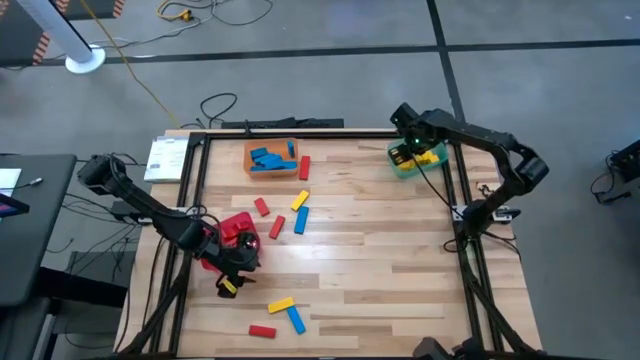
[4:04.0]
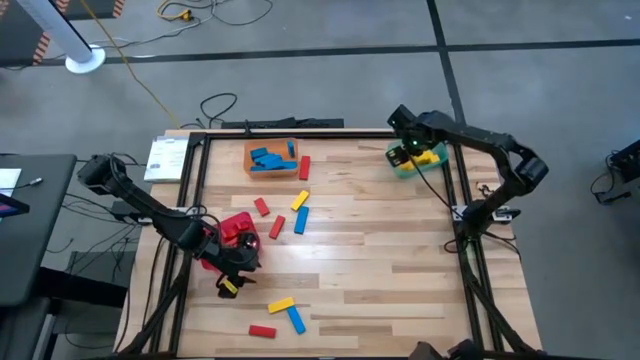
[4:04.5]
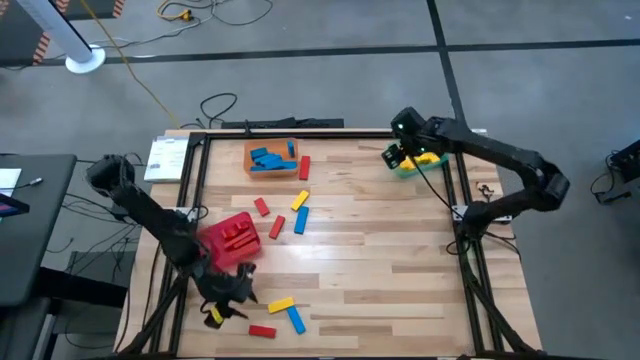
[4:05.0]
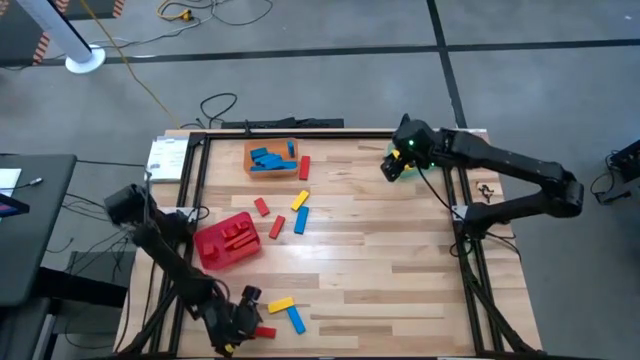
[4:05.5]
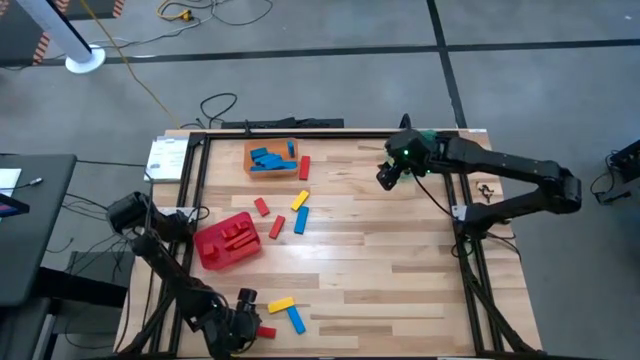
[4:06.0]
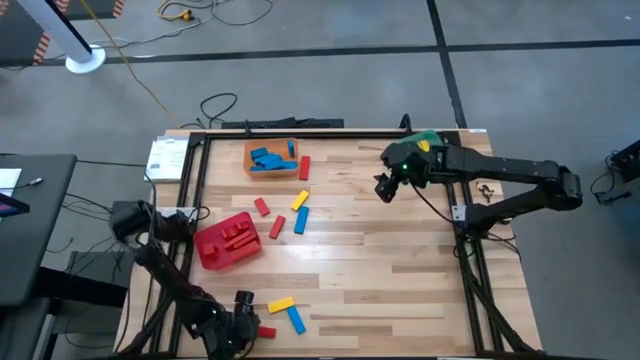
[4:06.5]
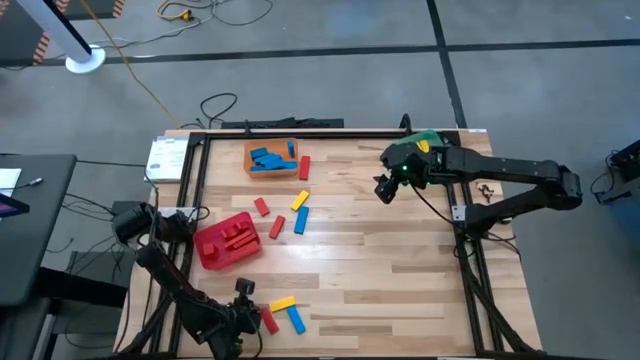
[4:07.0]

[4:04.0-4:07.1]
Task: Sort blocks
Put the red block into the red bin

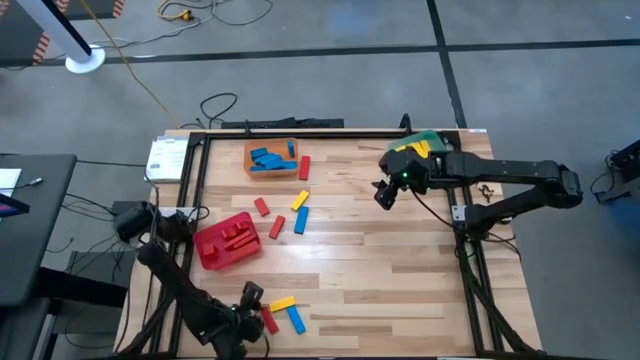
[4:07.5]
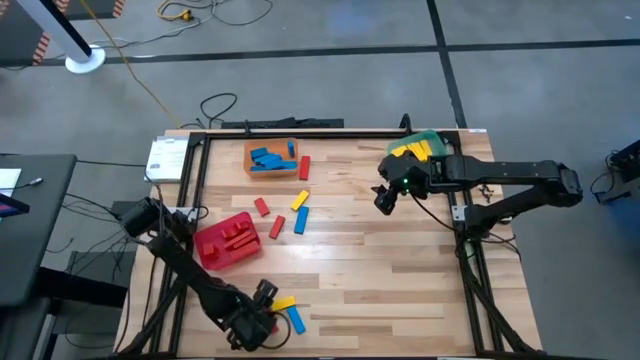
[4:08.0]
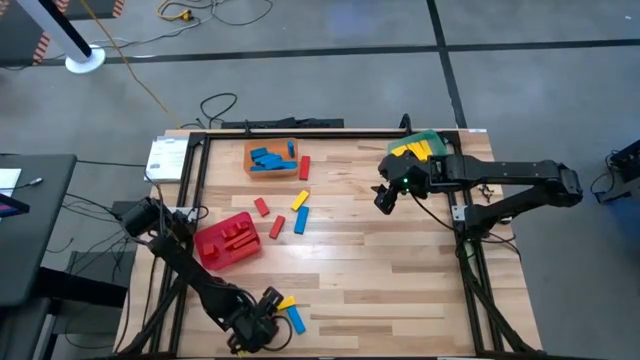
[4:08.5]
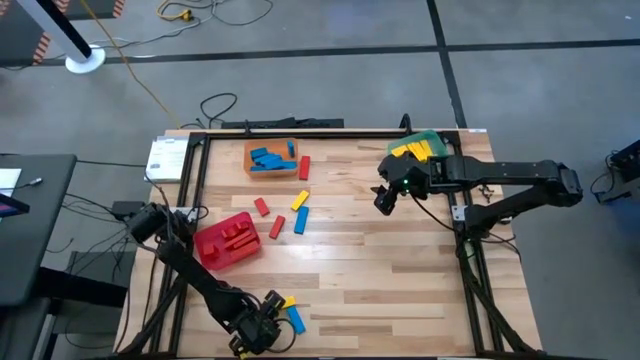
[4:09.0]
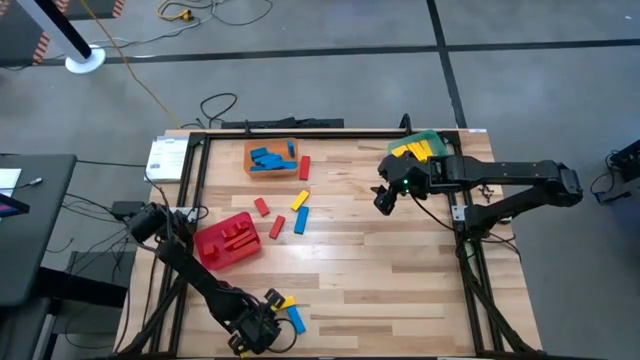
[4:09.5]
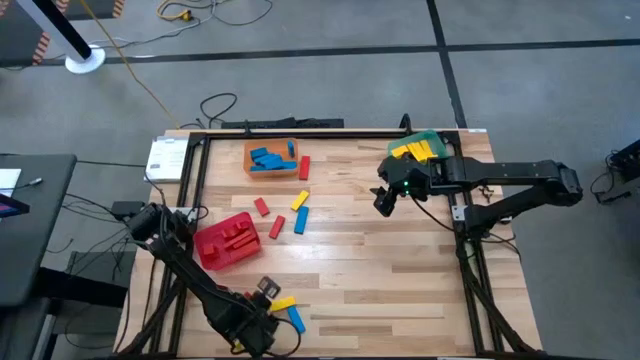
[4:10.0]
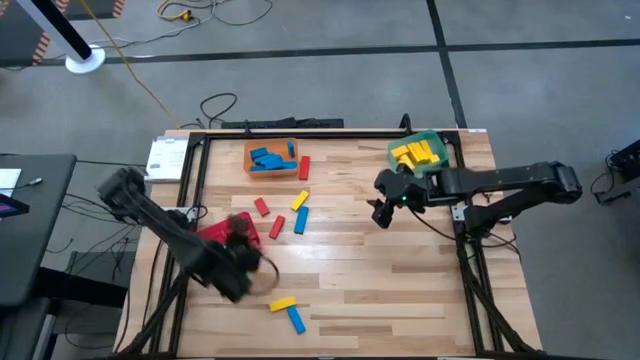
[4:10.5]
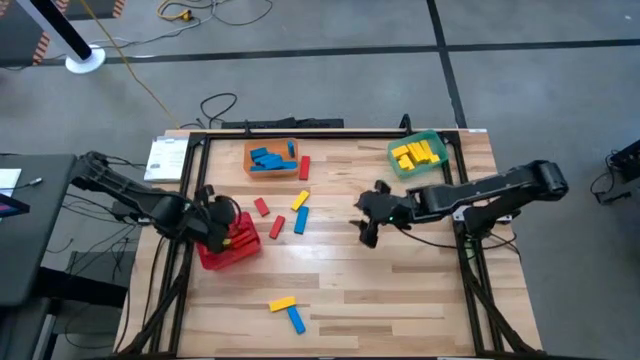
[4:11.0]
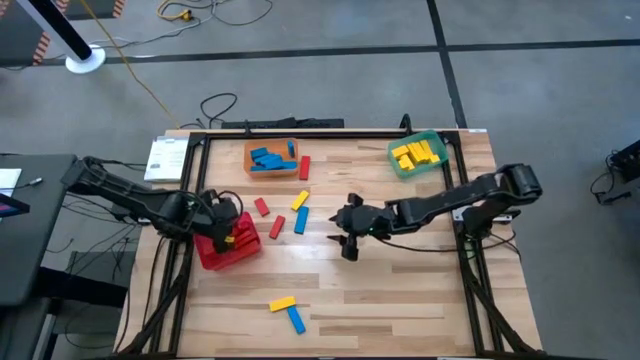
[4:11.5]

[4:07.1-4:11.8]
Put the red block into the red bin

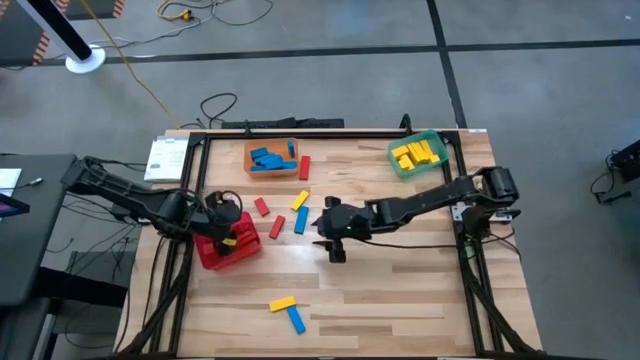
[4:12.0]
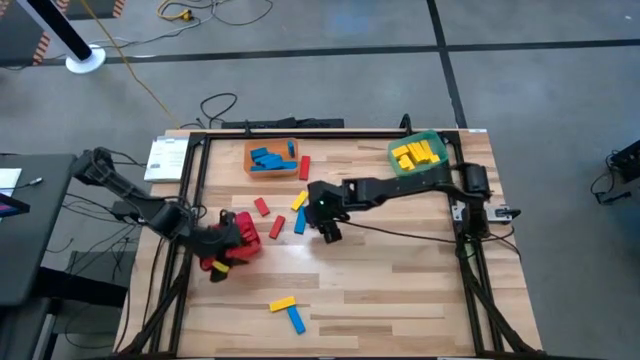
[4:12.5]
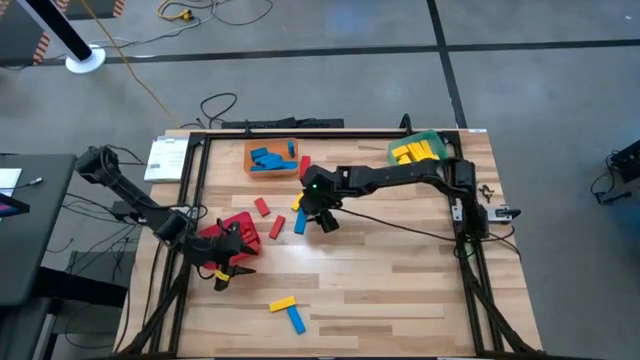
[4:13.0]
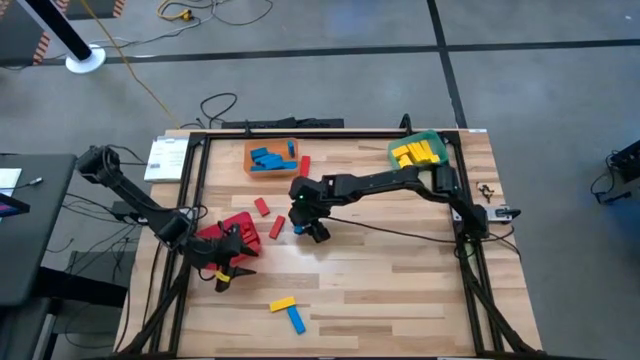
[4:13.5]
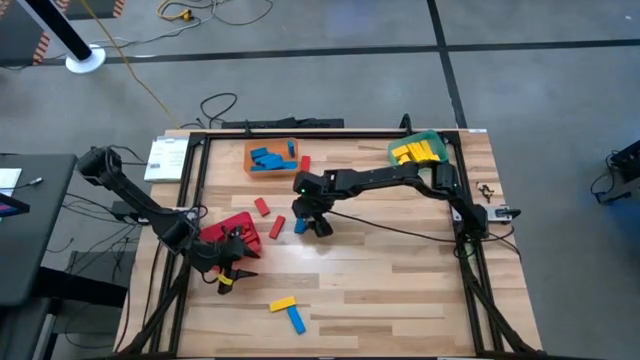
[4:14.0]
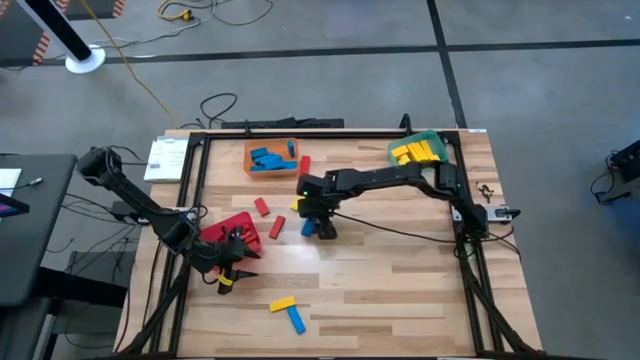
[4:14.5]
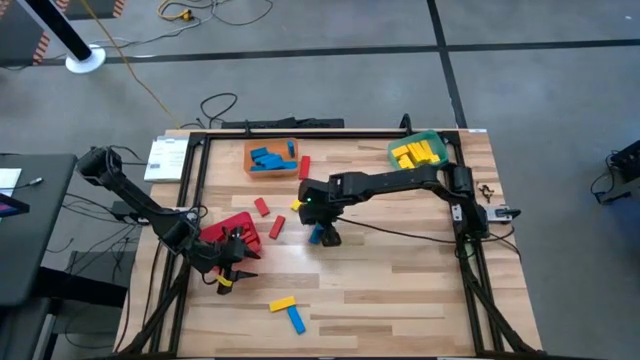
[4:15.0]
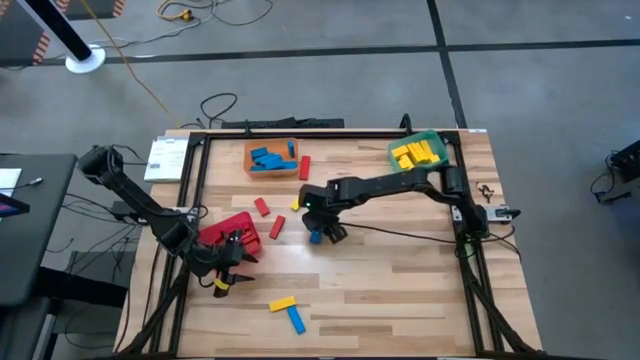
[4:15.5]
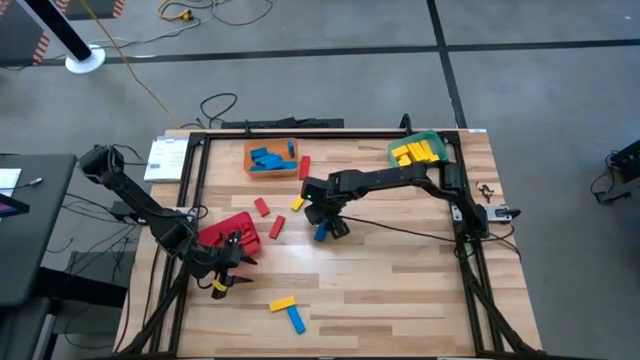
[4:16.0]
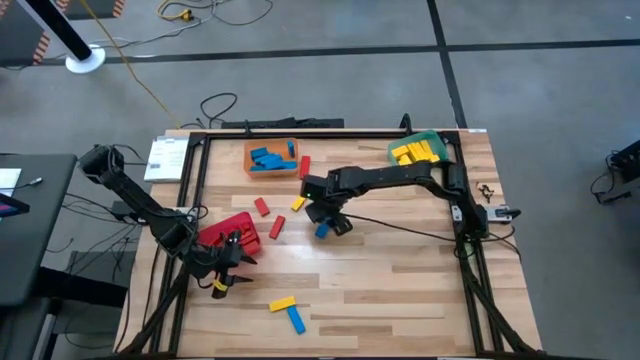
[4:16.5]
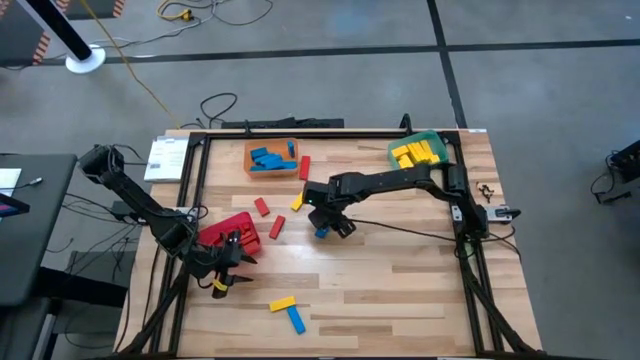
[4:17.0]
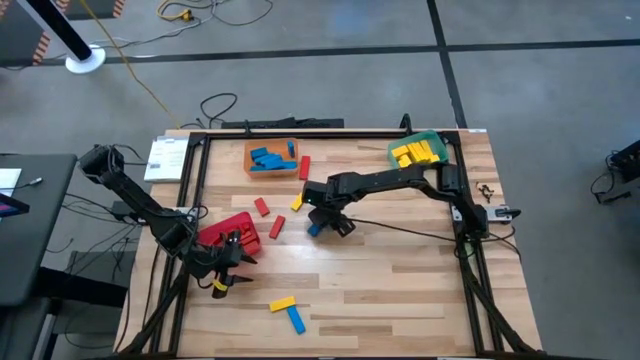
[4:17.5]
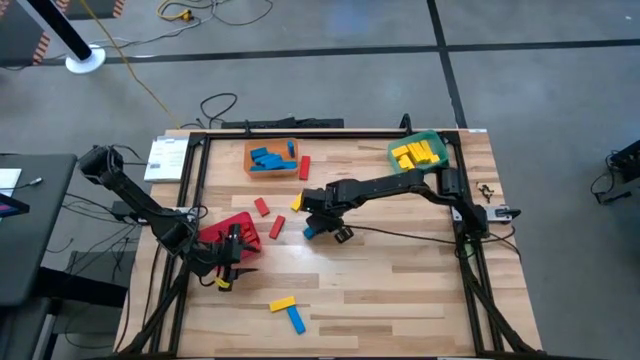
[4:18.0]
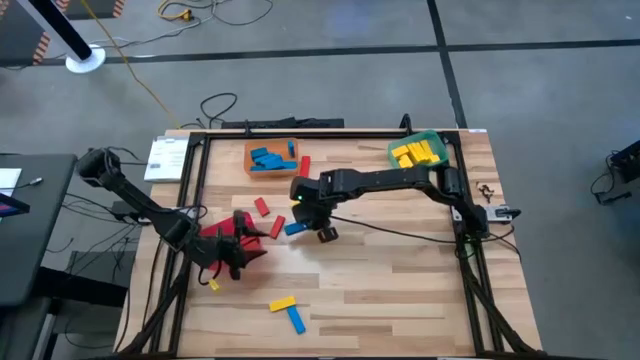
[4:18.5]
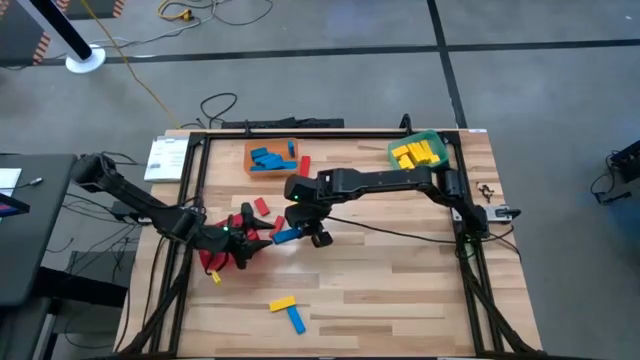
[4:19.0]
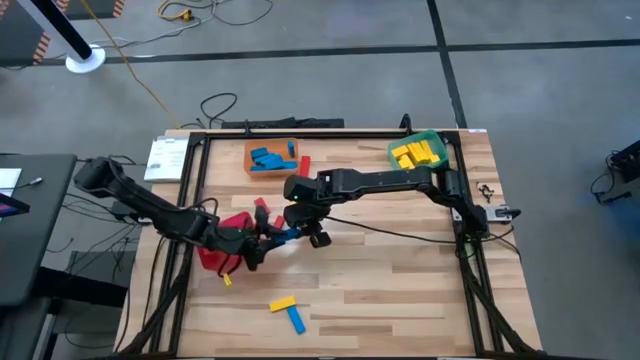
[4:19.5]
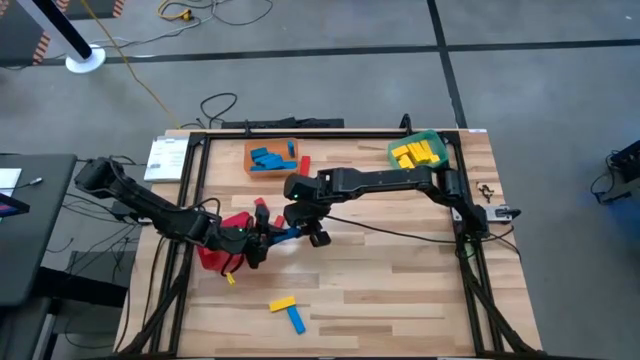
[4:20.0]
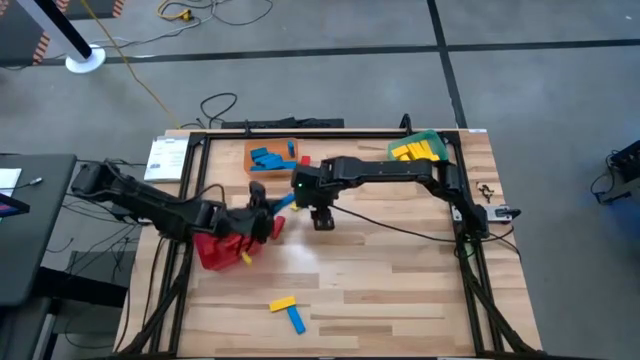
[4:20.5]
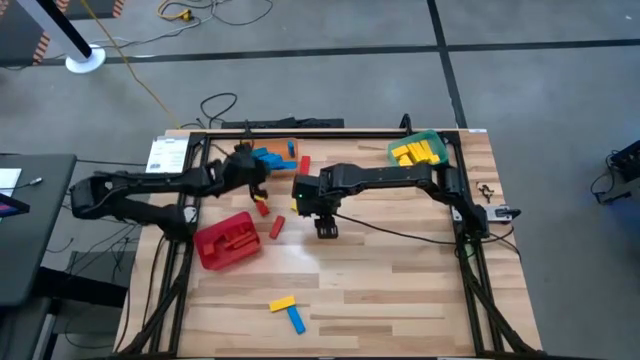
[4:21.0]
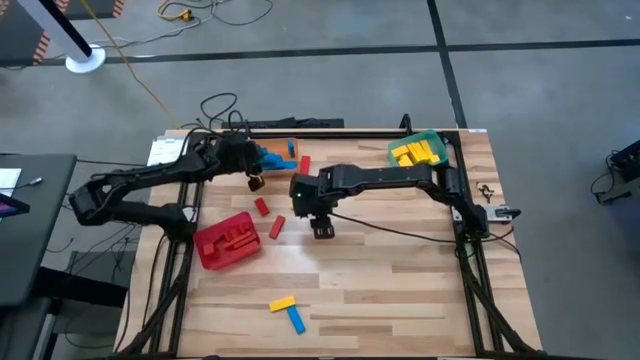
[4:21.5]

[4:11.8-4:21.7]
Put the blue block into the orange bin

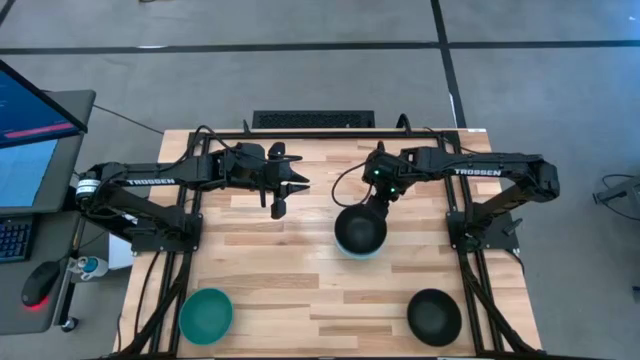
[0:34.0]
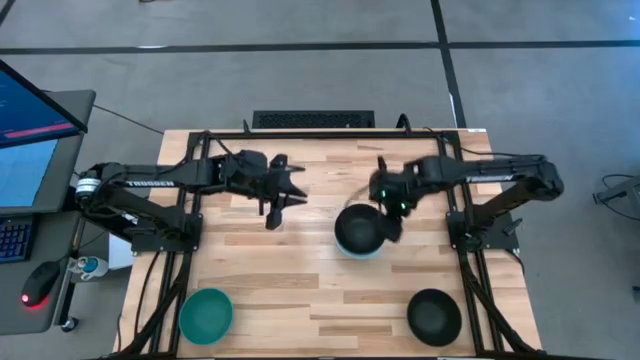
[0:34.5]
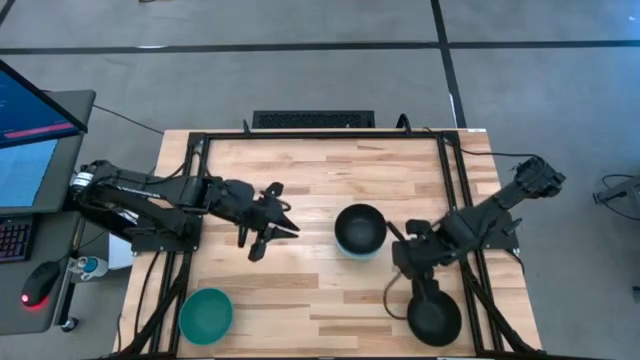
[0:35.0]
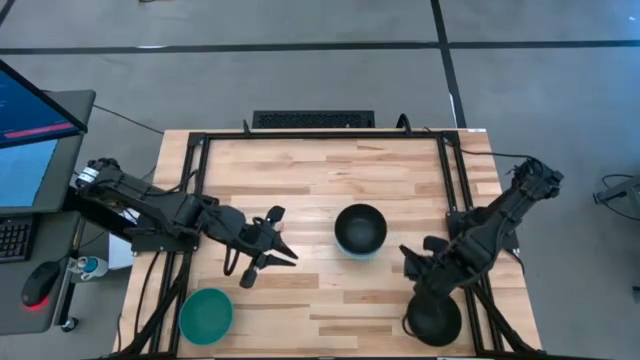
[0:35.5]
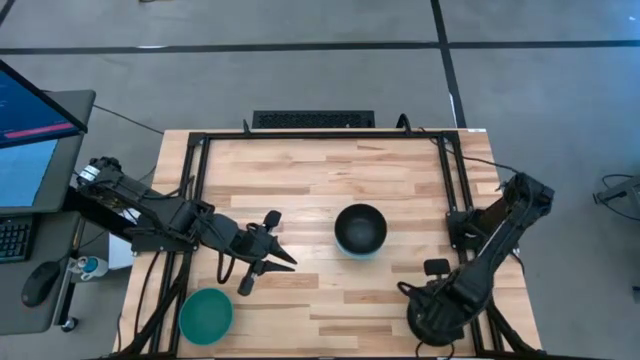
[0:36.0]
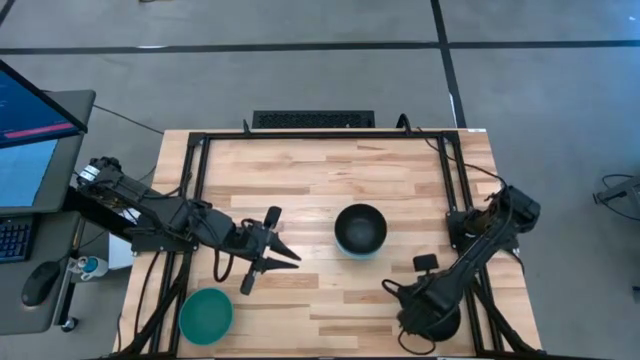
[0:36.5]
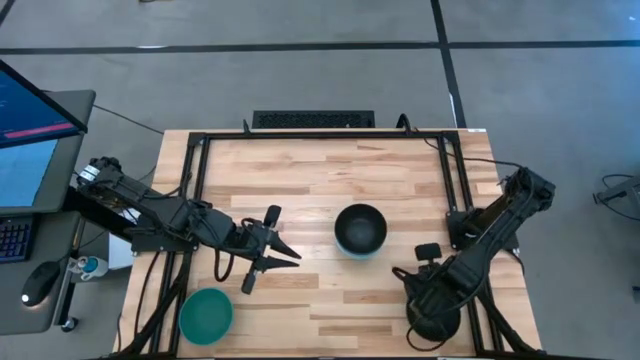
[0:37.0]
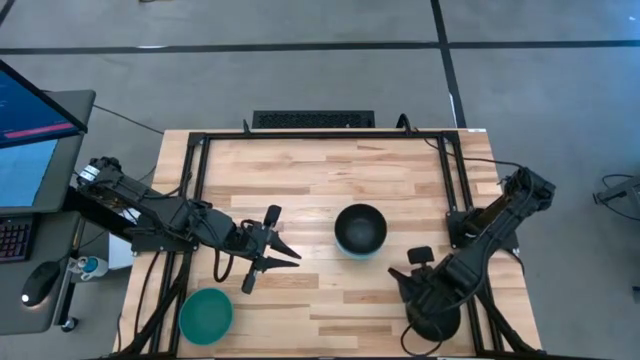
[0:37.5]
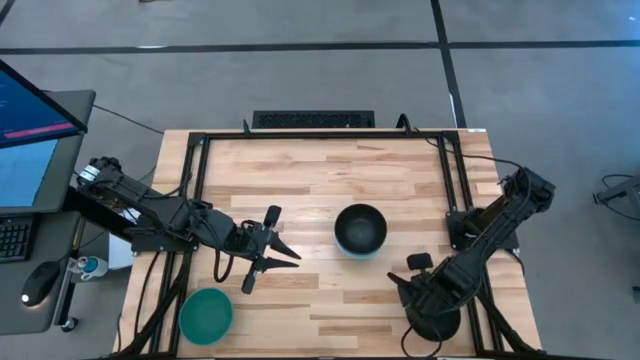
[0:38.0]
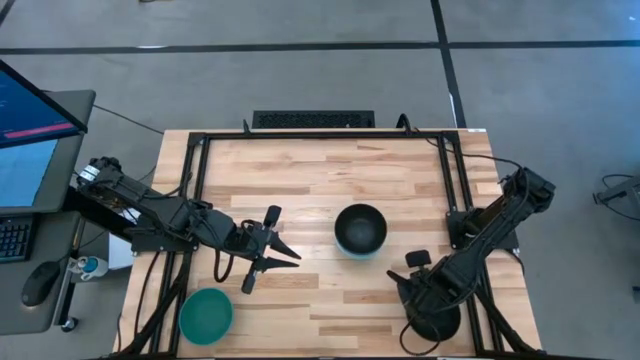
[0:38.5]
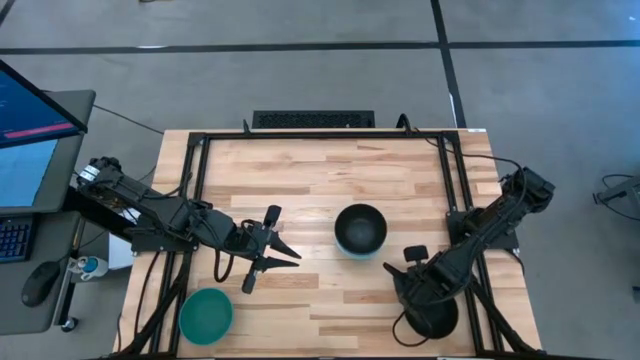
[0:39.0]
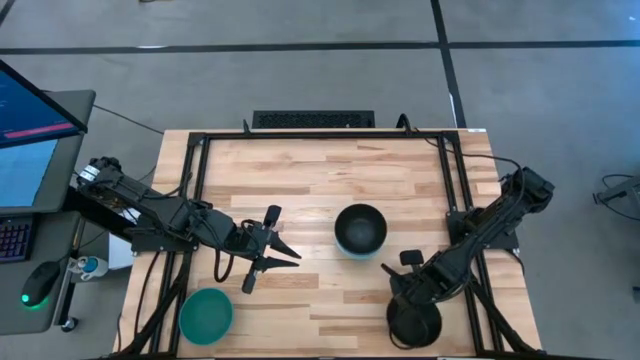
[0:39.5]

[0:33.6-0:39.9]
Task: Nest bowls inside each other
Stack the black bowl on top of the black bowl
